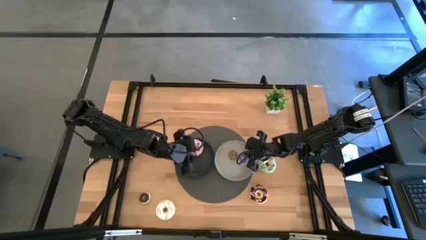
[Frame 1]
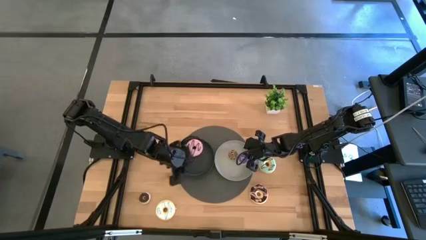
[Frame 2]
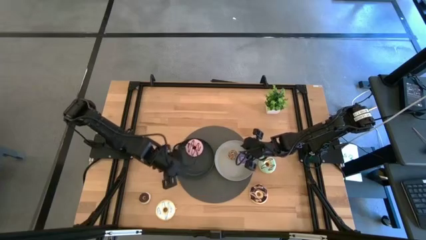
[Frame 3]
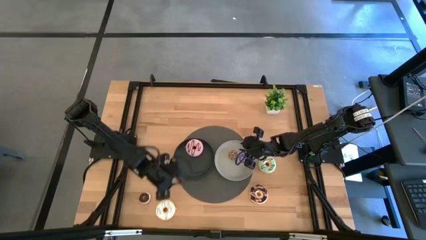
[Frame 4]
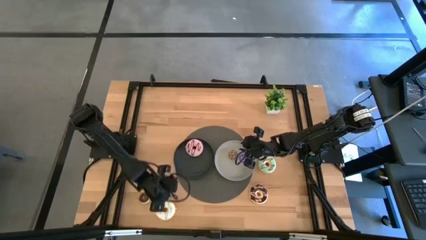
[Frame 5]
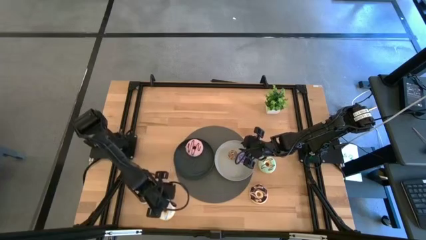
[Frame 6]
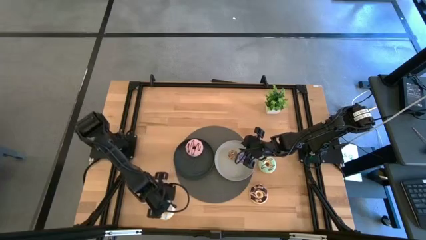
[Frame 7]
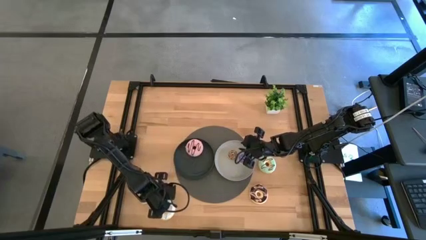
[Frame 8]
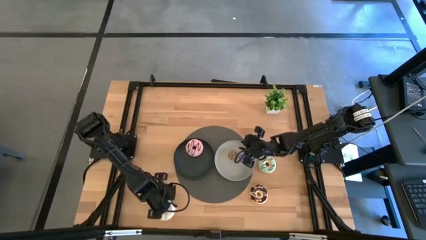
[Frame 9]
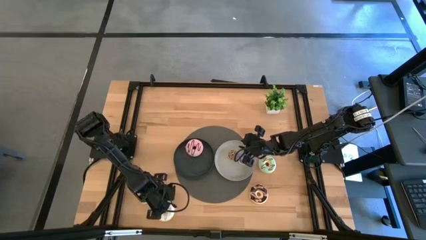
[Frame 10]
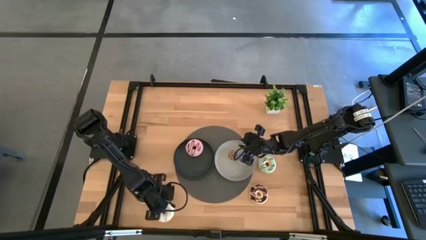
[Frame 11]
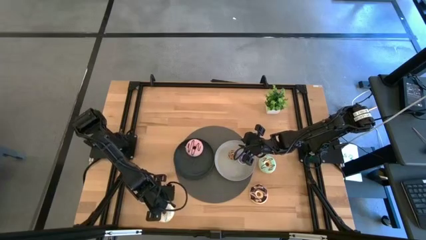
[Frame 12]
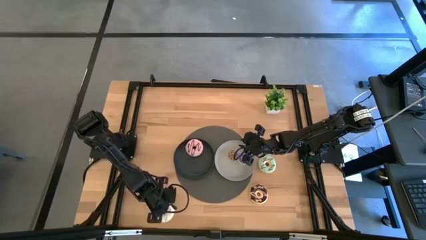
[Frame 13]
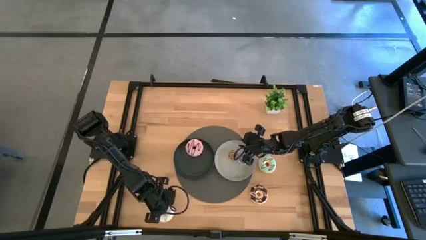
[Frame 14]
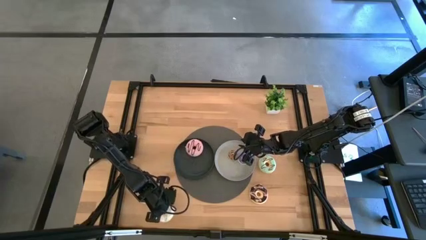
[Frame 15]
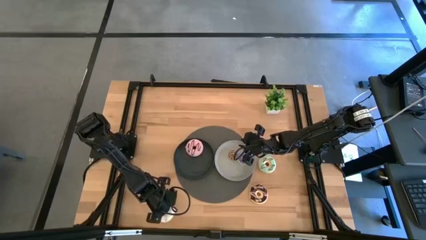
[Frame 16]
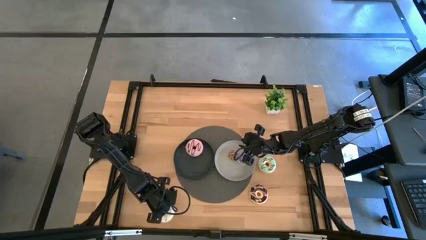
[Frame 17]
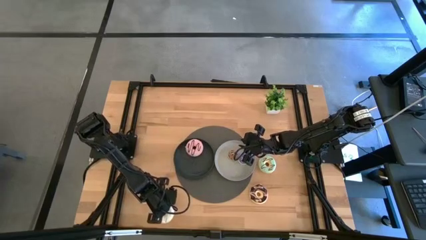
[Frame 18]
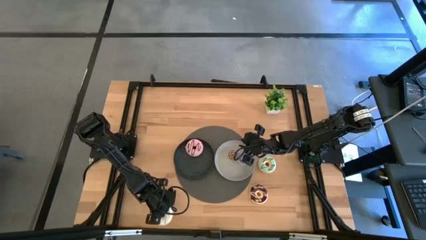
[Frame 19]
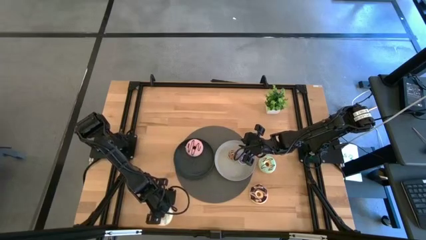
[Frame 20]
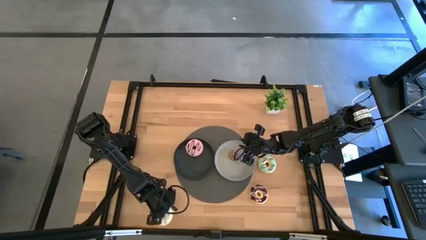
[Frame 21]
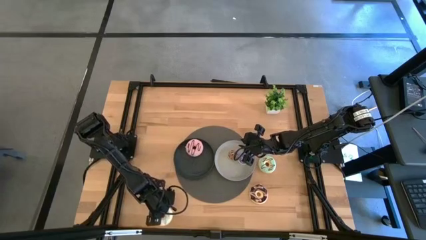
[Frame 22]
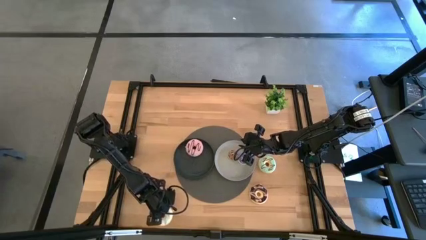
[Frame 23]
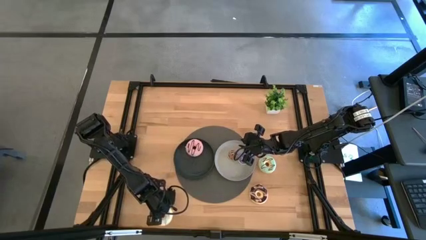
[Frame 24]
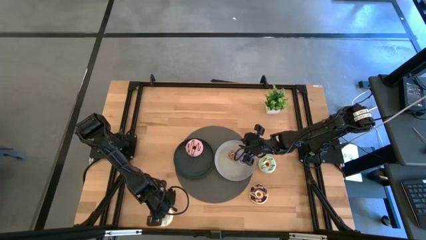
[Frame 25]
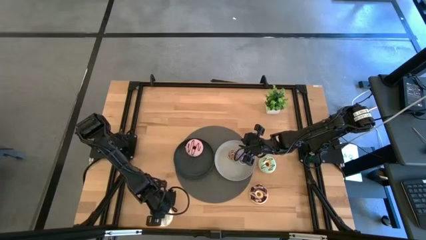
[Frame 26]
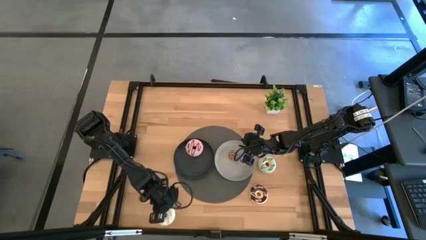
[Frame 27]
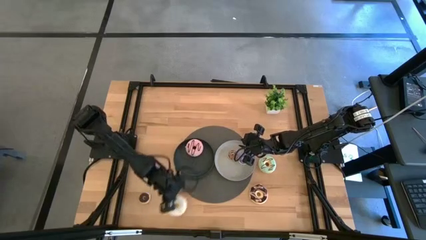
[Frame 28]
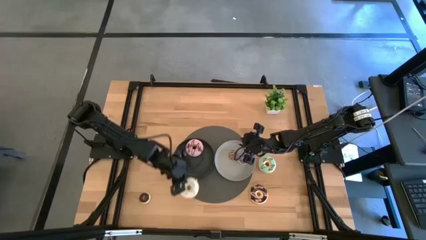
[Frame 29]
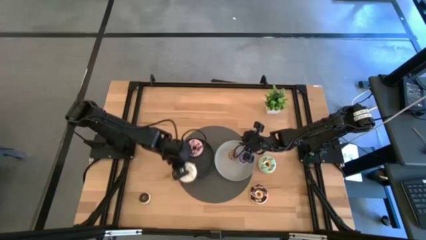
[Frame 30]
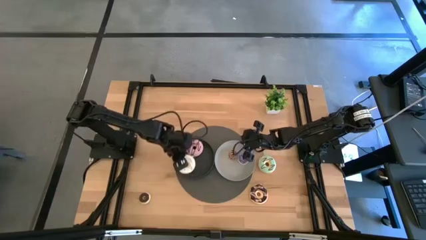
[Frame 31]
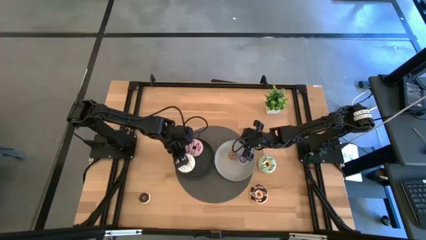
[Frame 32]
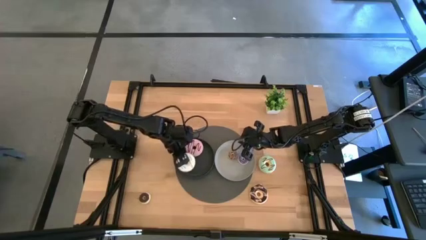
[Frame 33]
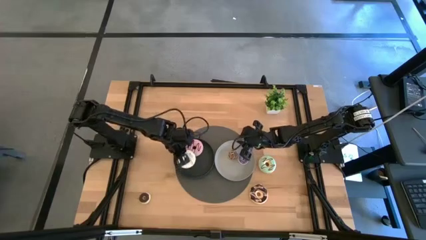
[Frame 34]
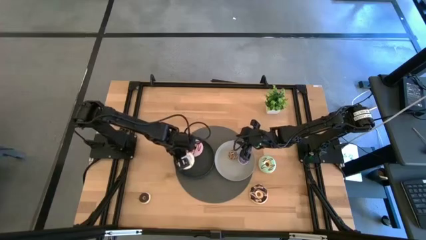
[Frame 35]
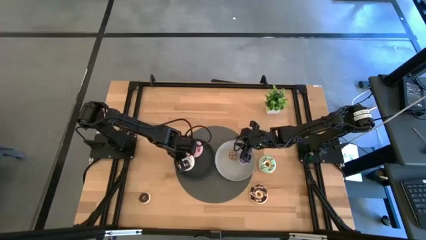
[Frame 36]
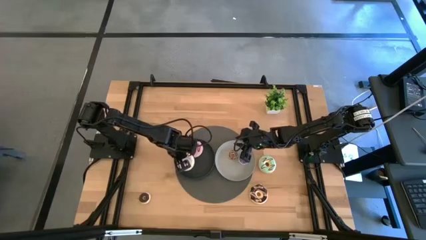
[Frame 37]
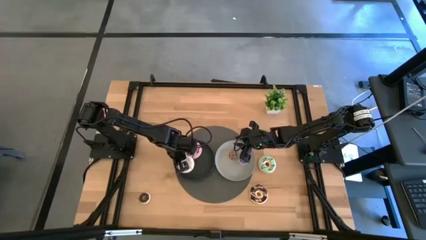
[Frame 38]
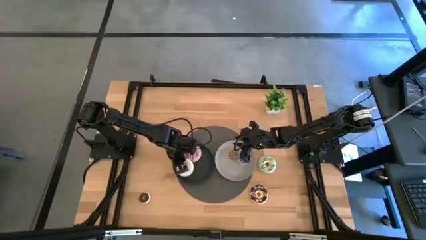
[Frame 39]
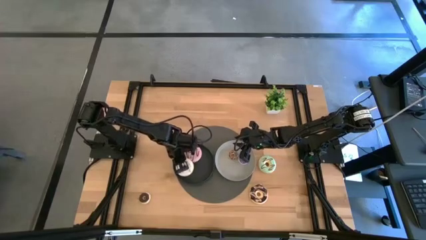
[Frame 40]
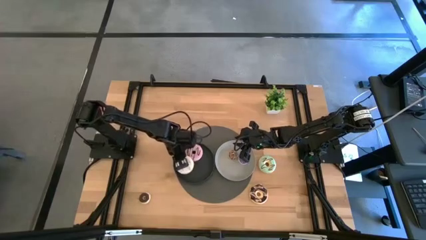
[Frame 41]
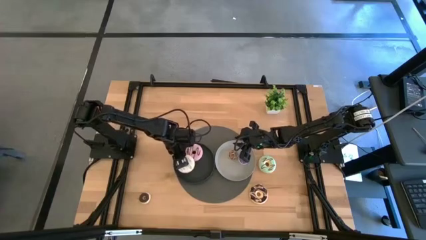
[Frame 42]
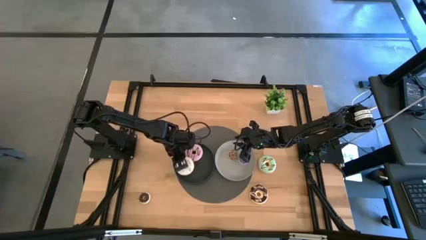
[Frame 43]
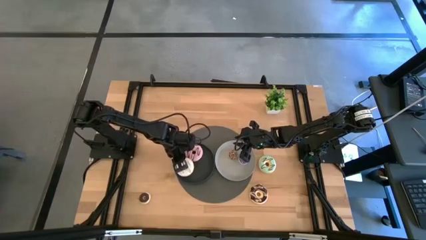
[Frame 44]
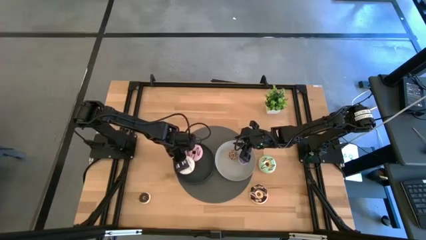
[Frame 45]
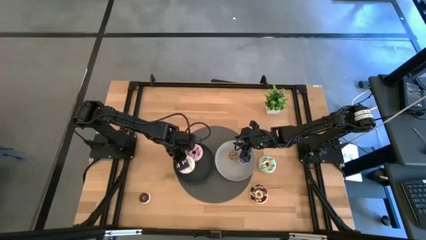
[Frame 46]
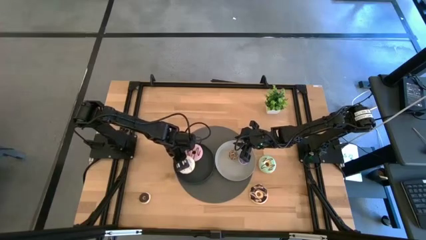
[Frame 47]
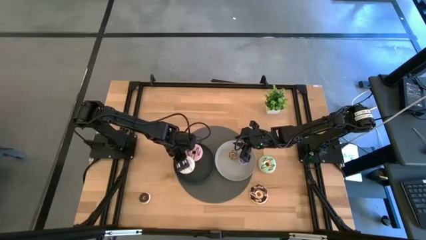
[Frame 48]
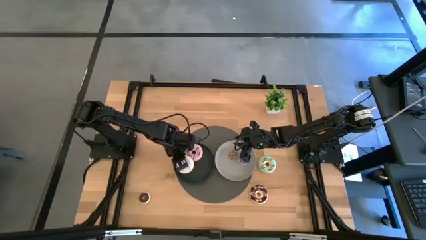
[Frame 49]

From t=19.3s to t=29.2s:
Task: Pick & Place donuts
Put the big white donut on the black plate

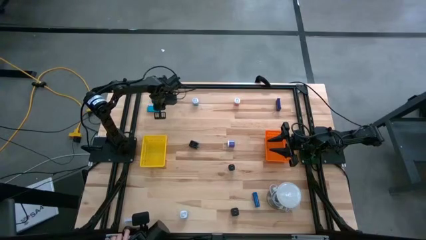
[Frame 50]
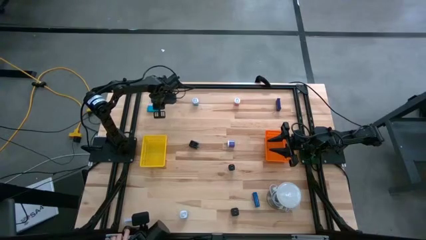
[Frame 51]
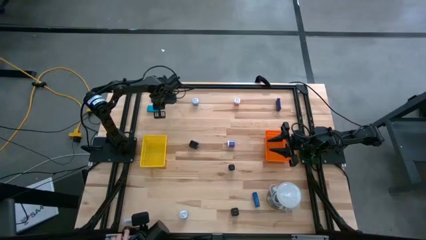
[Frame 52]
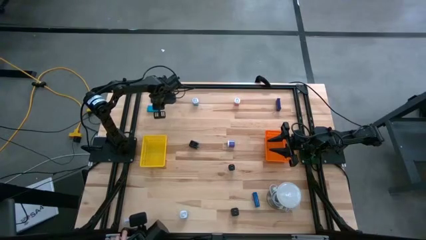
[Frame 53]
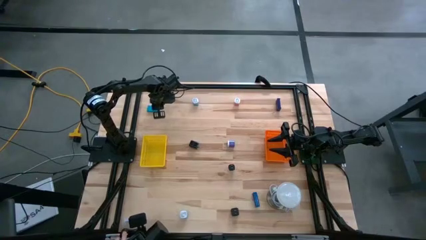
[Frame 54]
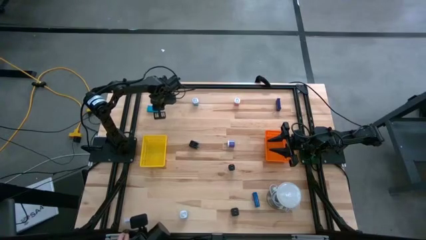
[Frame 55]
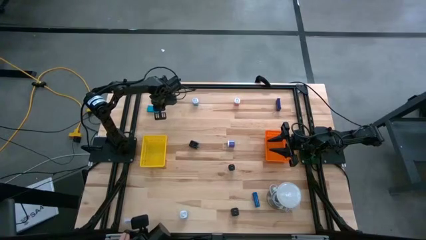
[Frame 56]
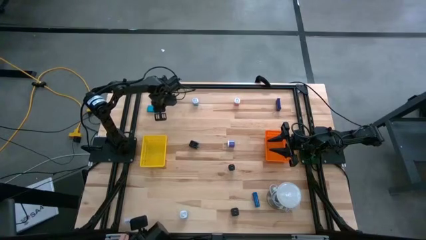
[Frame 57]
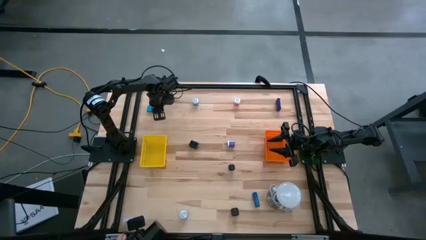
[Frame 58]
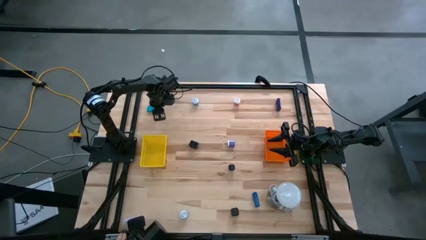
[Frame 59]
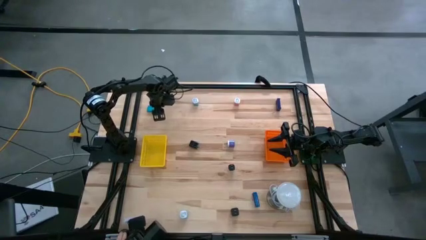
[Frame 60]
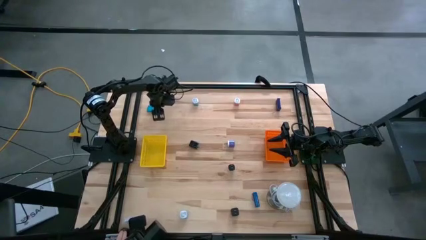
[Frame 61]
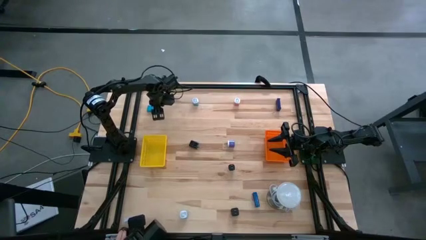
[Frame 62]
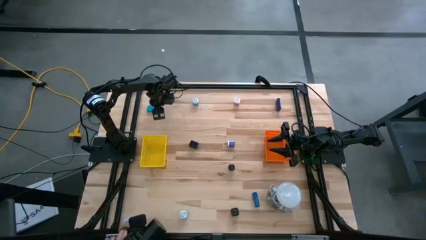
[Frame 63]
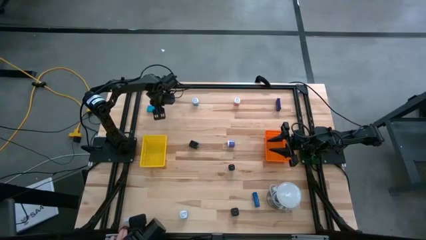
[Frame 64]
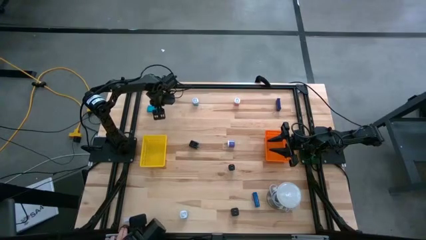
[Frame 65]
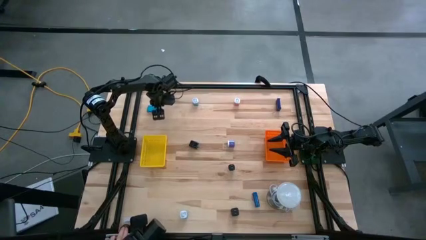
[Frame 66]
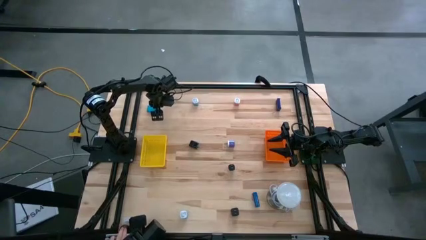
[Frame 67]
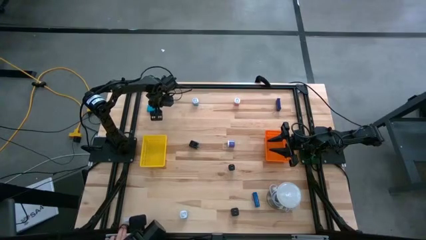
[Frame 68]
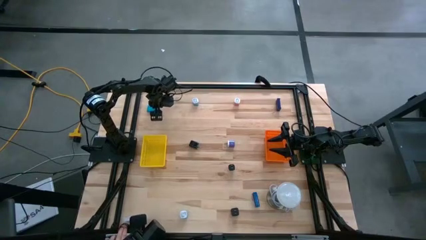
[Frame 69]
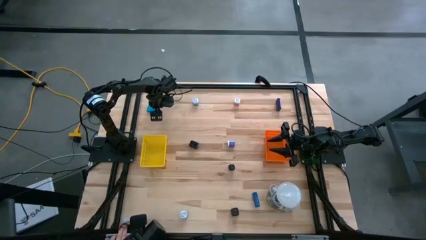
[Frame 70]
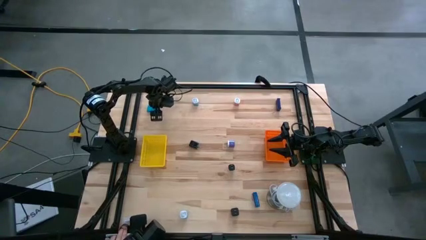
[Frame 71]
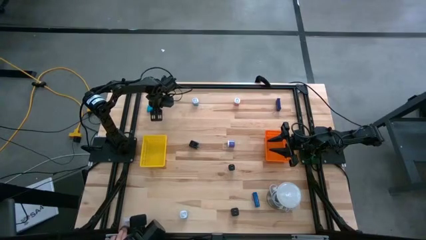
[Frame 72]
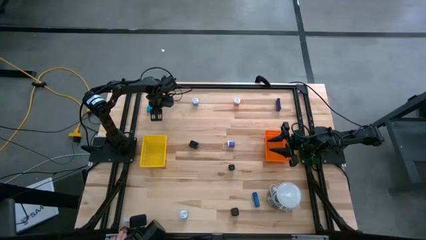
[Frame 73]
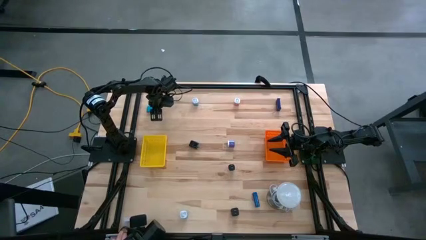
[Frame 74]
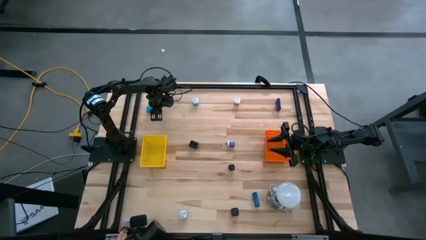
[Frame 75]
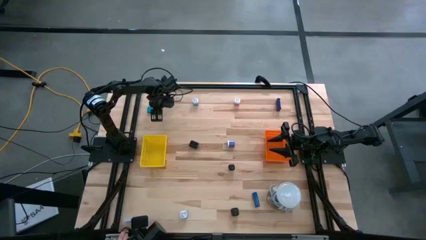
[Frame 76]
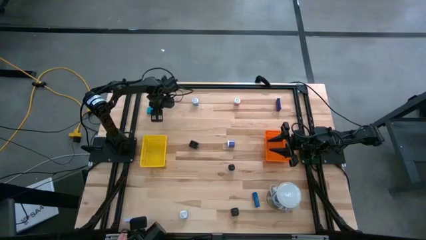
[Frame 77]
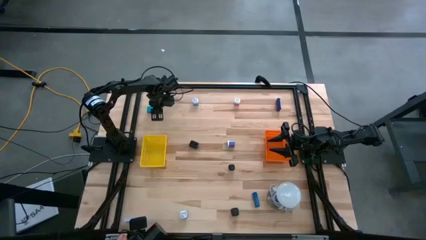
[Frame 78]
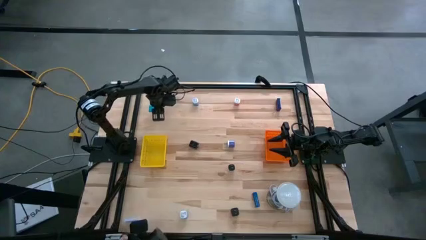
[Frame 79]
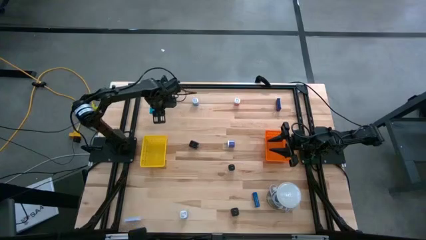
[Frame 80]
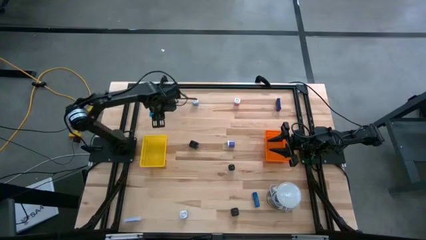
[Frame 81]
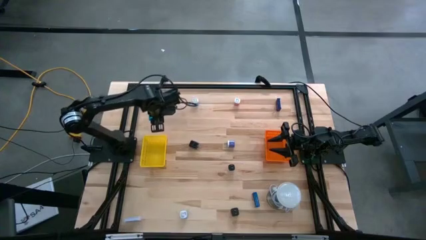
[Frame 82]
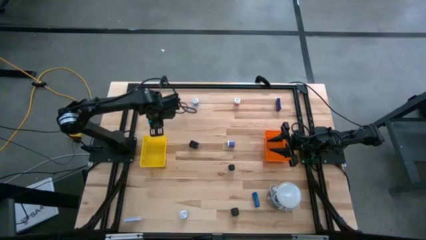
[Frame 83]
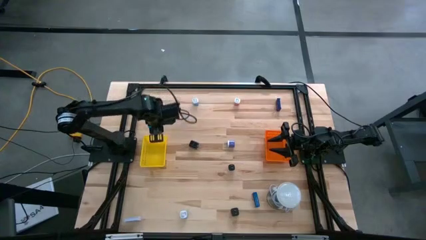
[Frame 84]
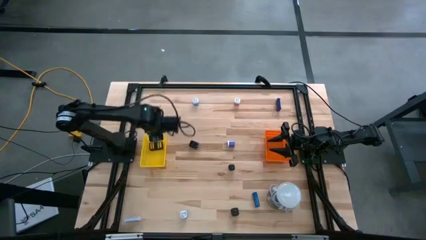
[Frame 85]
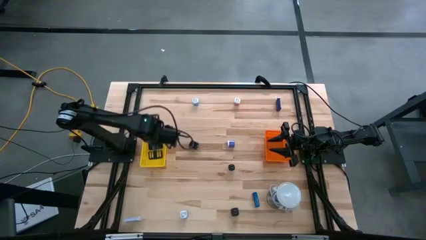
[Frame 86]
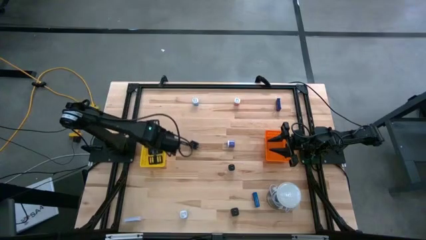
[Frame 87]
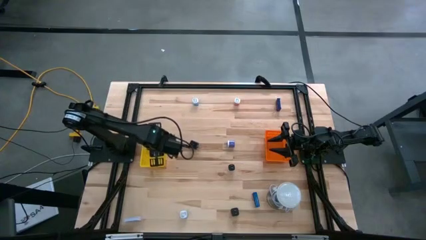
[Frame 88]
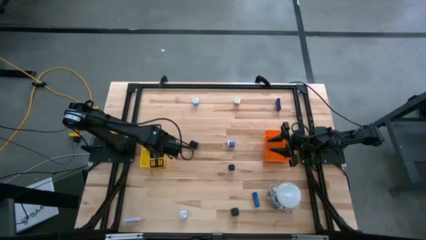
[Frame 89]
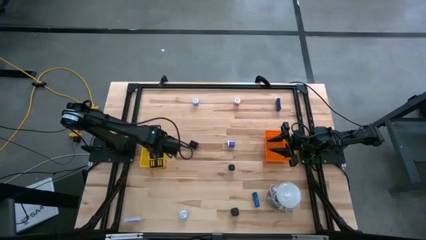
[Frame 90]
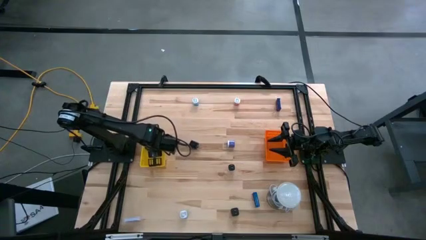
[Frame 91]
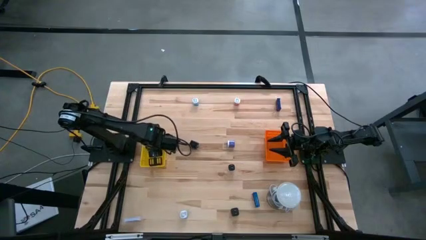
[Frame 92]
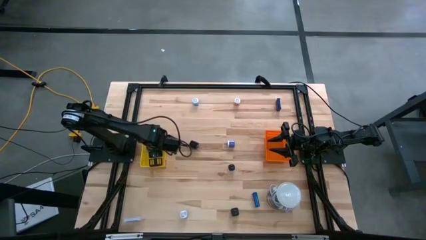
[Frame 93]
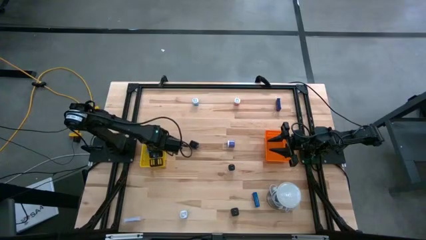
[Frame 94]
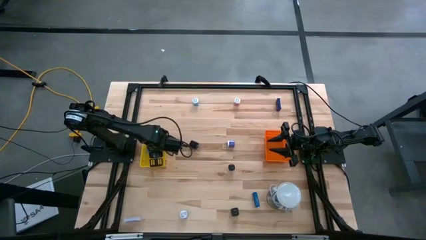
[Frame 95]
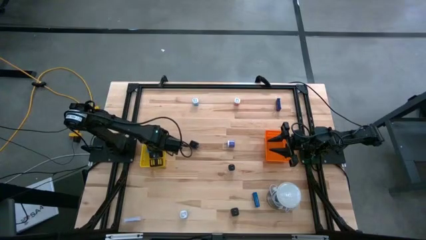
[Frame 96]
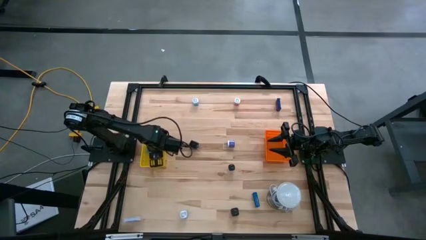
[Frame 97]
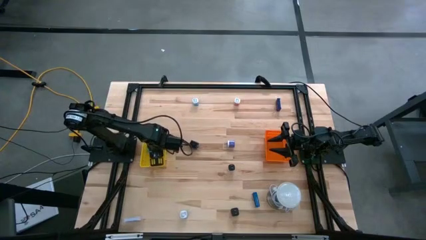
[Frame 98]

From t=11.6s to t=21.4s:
Task: Pick & Place Office items
Put the light blue digital timer into the yellow bin
